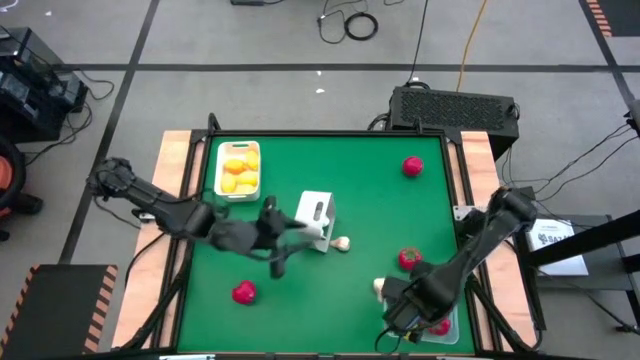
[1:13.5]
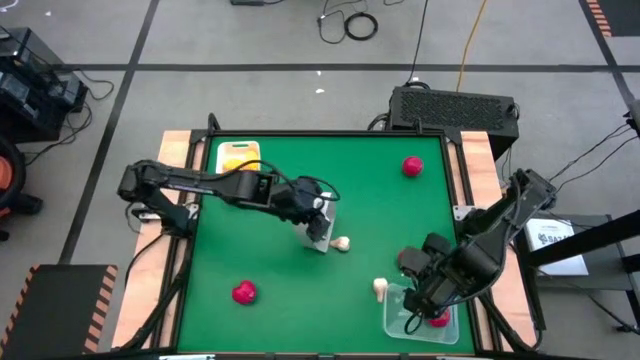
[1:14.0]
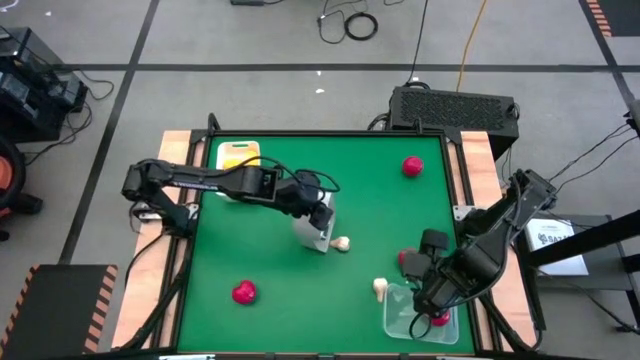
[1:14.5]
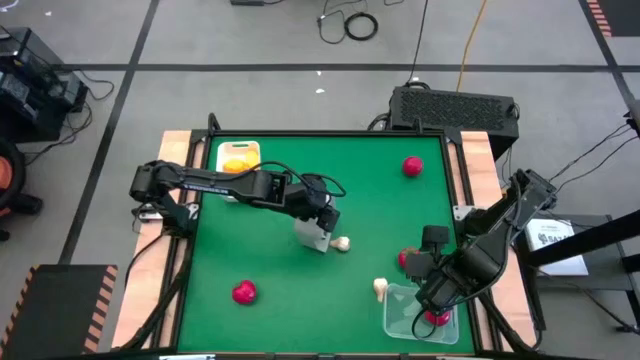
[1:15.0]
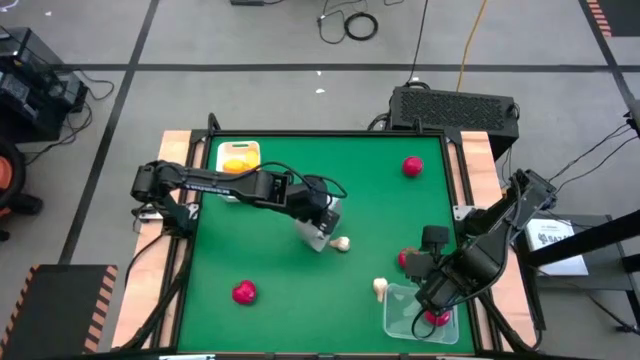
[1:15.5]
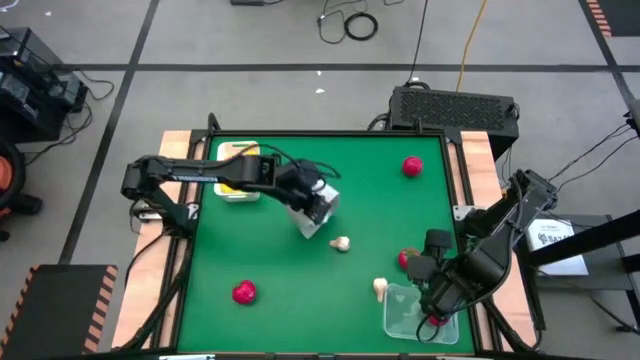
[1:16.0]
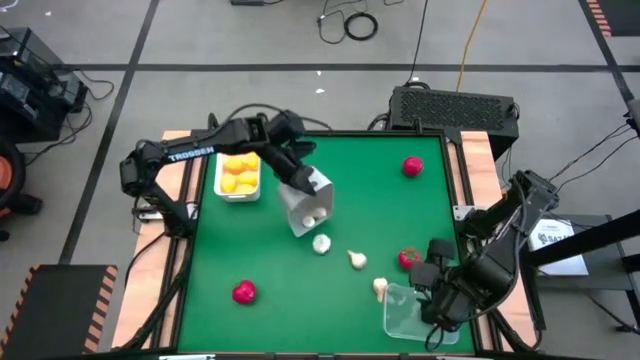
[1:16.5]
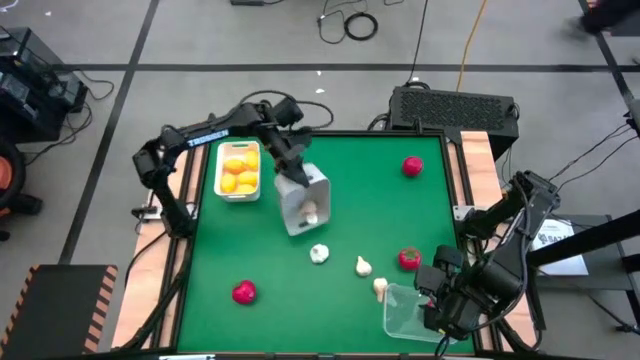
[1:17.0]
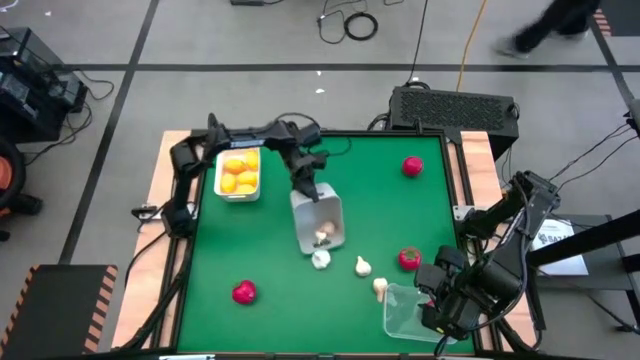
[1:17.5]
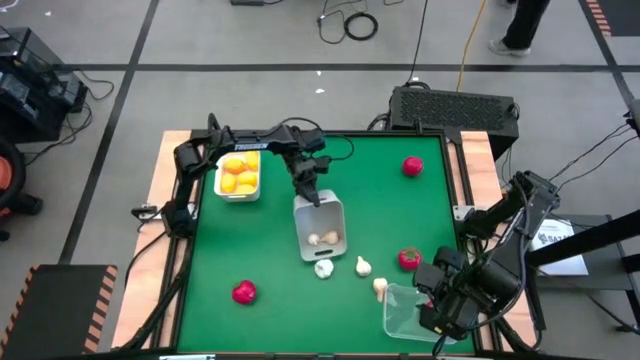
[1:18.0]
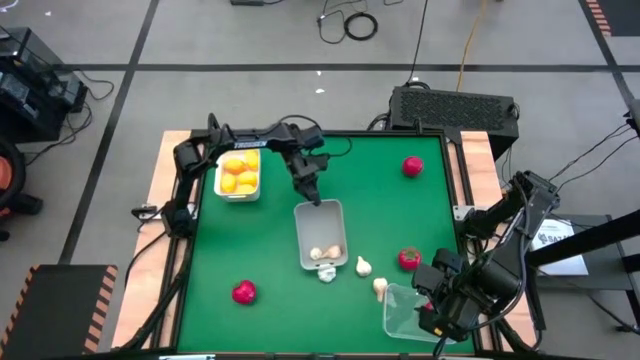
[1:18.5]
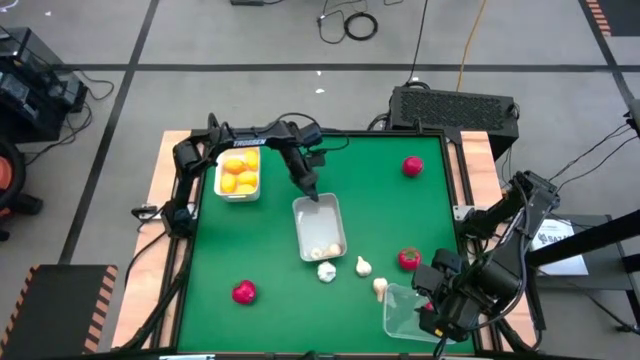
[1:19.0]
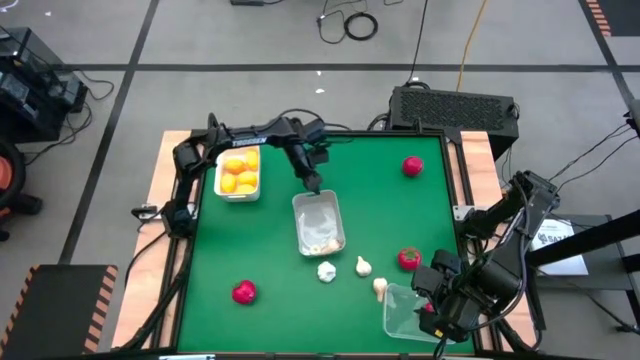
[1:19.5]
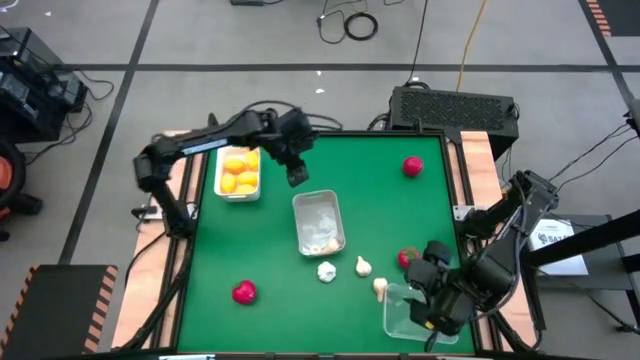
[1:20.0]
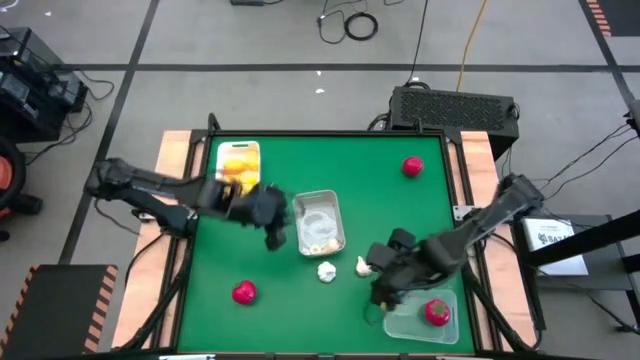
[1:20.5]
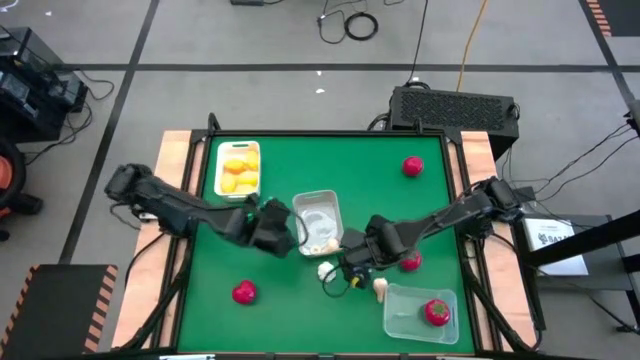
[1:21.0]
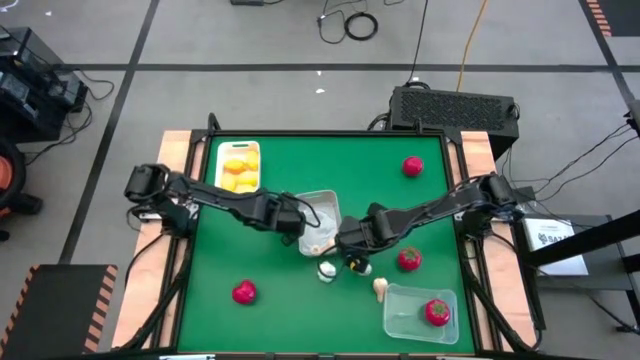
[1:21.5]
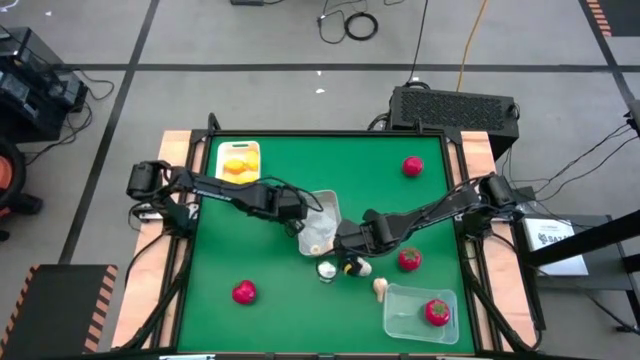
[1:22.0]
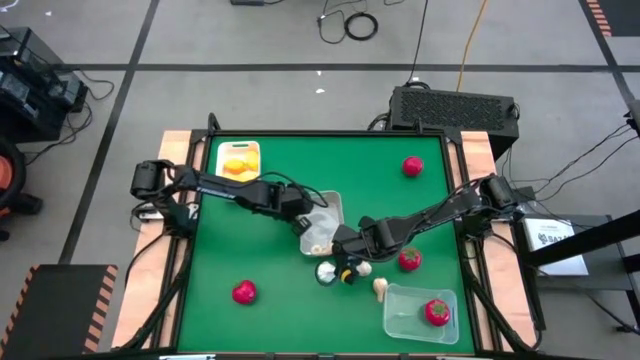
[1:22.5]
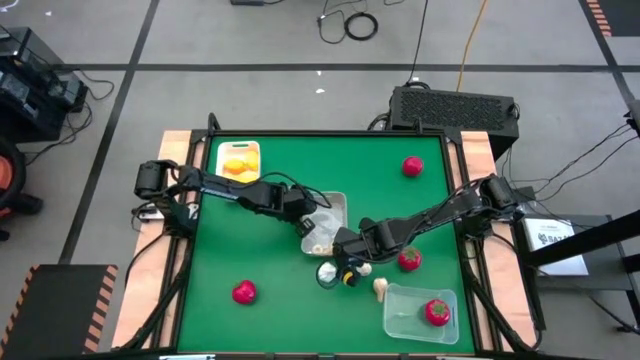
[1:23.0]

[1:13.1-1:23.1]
Task: Sort produce into baskets
Adjust the gray bin

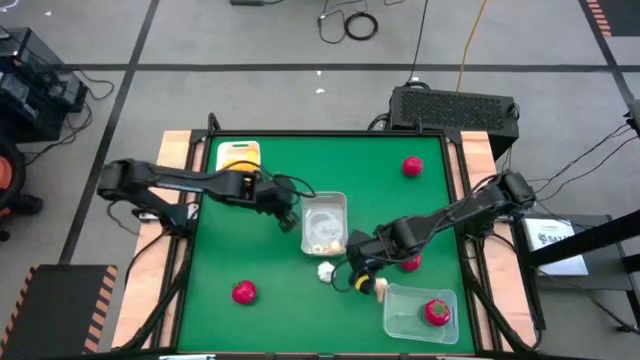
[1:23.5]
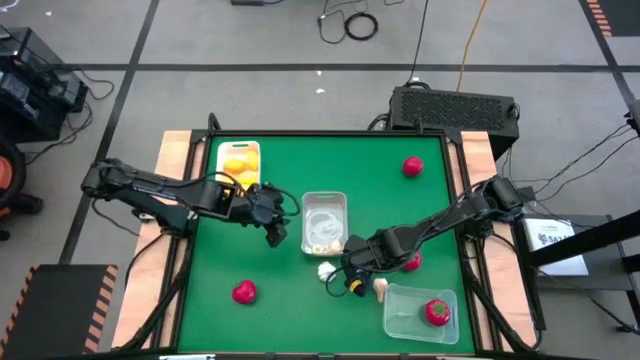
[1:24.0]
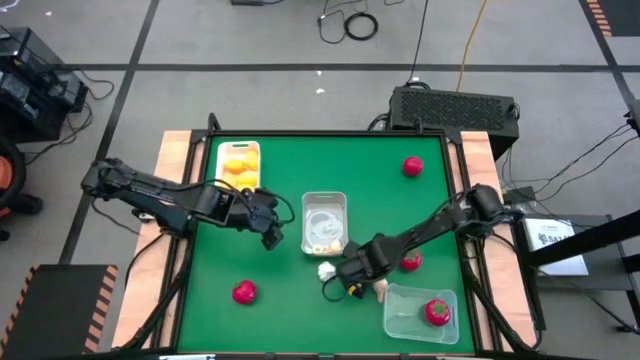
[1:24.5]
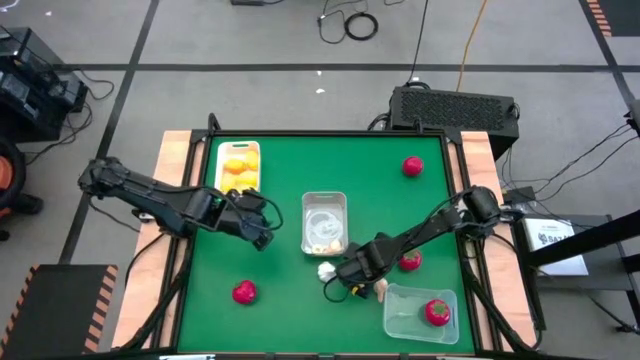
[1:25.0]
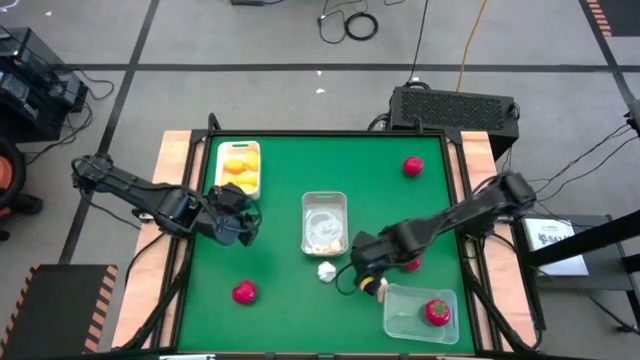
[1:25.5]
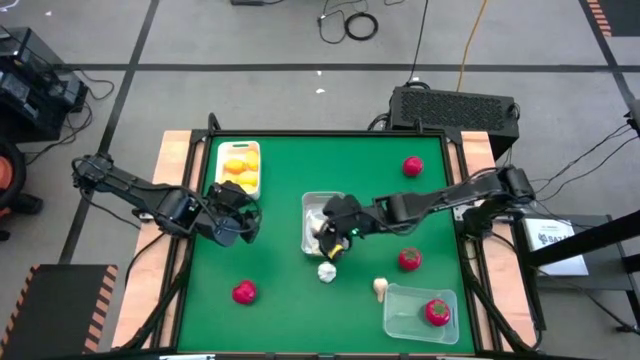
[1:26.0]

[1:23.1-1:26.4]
Put the garlic into the gray bin

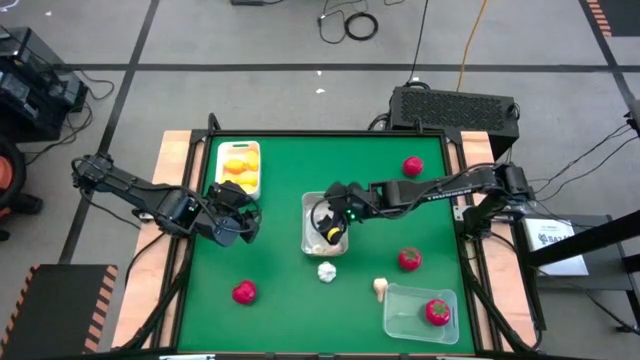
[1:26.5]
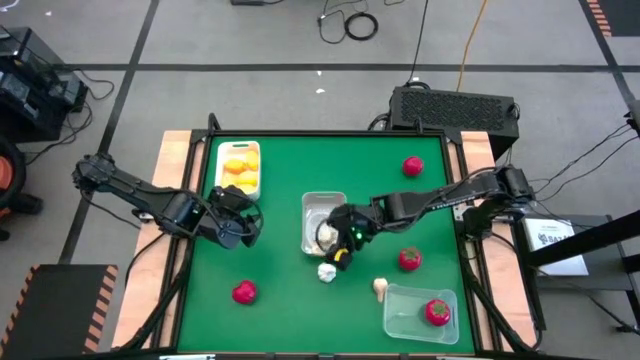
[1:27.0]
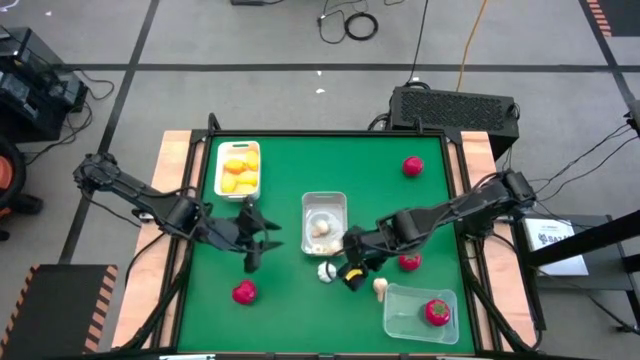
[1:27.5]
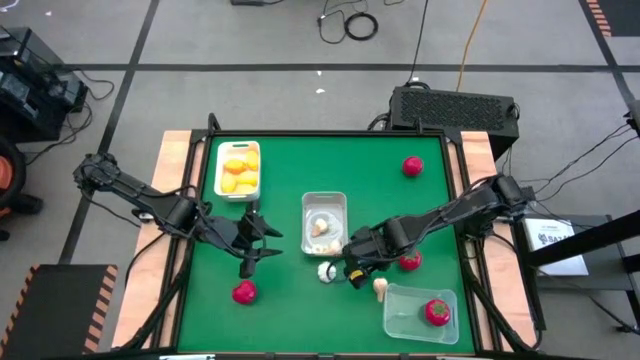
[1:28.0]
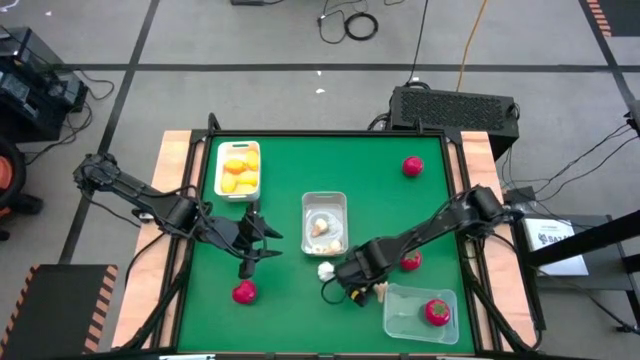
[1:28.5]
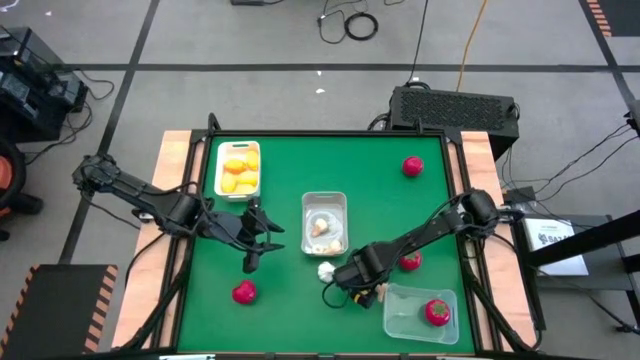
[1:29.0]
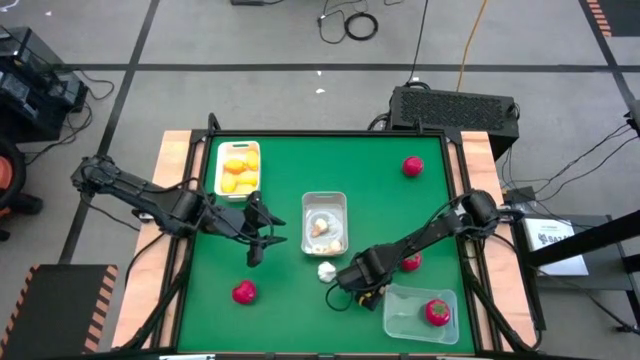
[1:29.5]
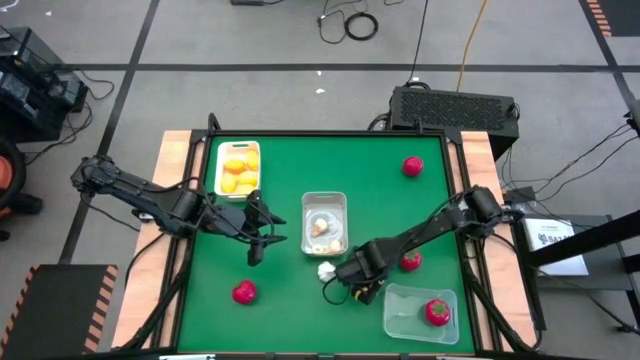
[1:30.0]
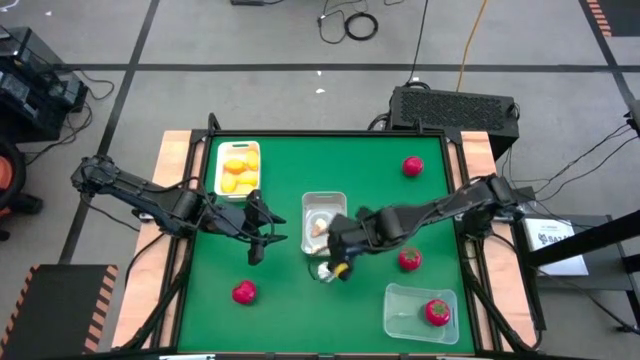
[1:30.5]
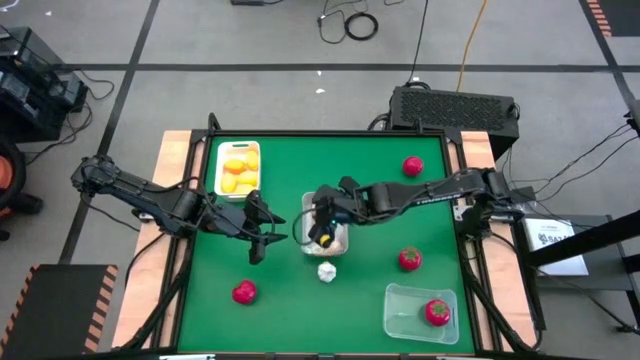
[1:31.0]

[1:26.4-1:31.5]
Put the garlic into the gray bin

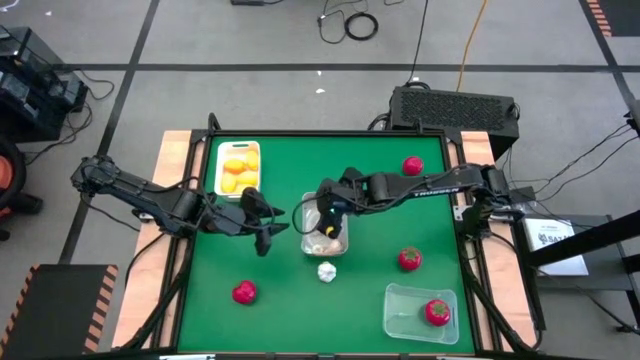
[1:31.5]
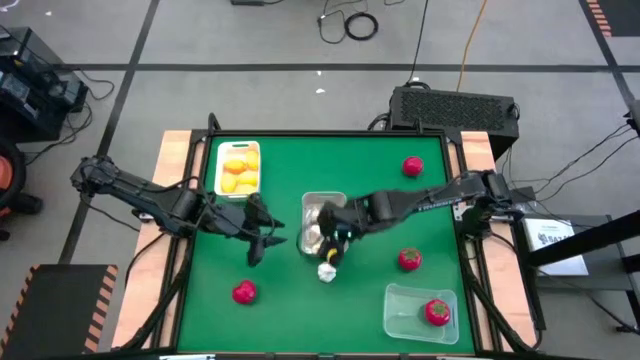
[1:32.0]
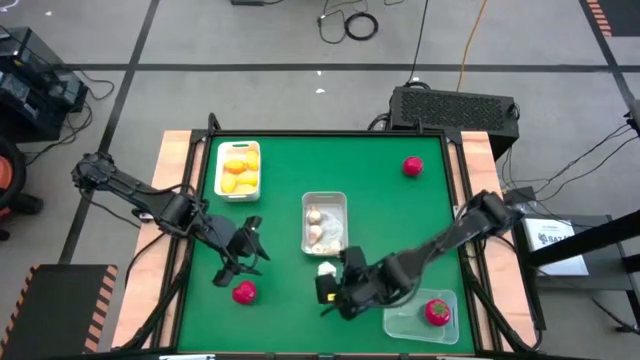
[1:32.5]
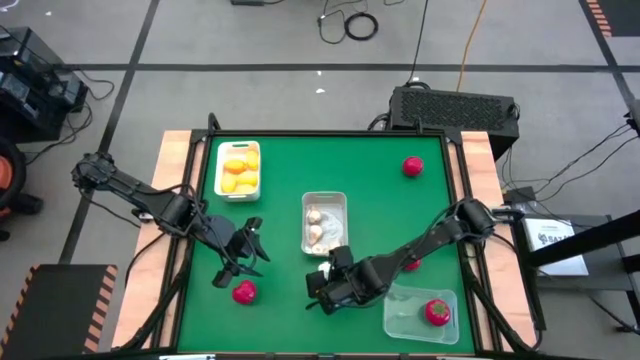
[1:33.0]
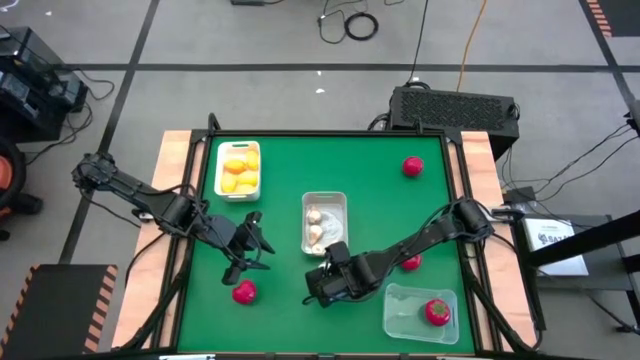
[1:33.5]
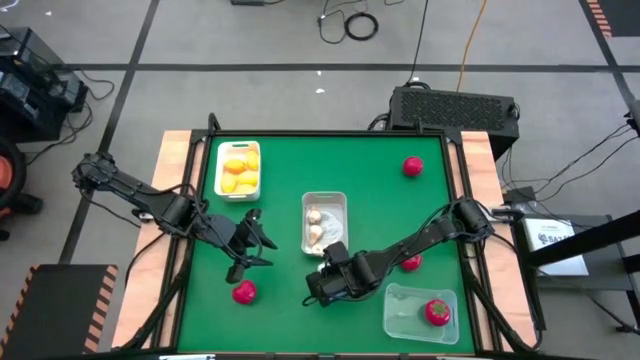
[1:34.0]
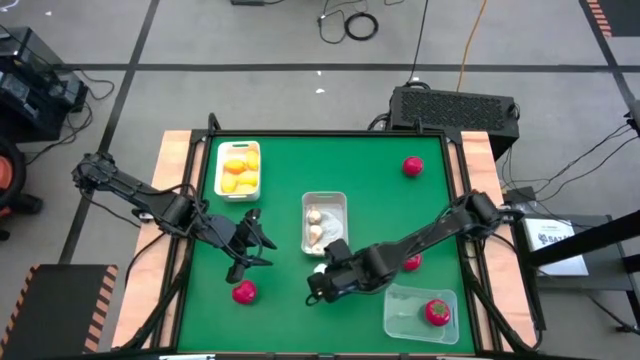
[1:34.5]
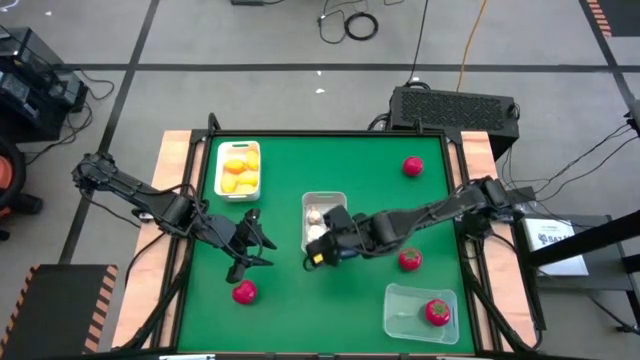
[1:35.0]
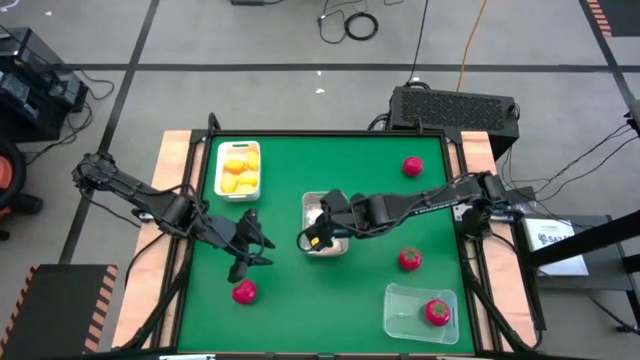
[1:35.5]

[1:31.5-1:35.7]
Put the garlic into the gray bin
